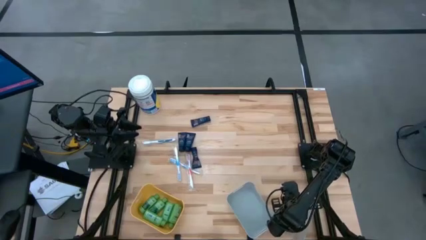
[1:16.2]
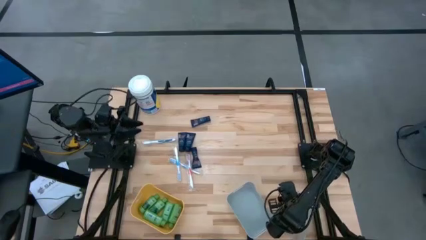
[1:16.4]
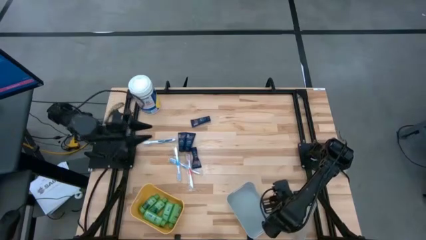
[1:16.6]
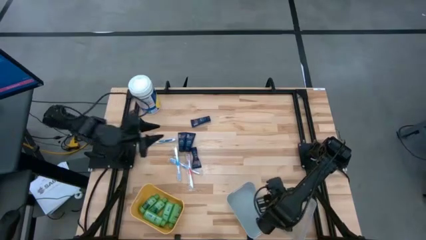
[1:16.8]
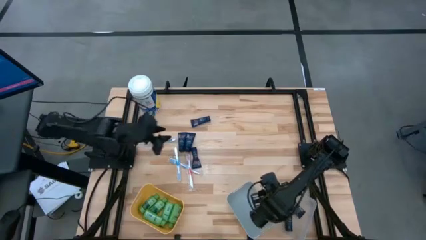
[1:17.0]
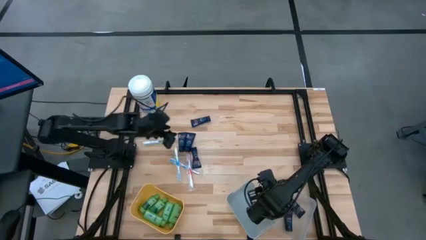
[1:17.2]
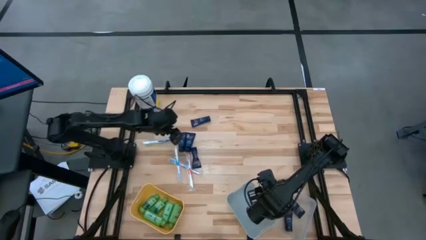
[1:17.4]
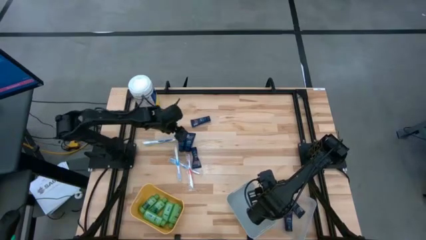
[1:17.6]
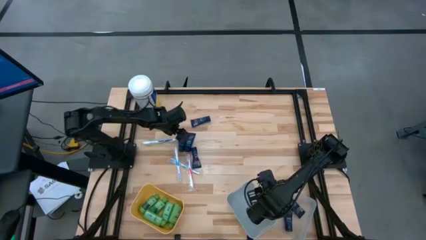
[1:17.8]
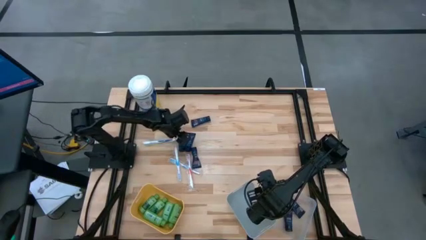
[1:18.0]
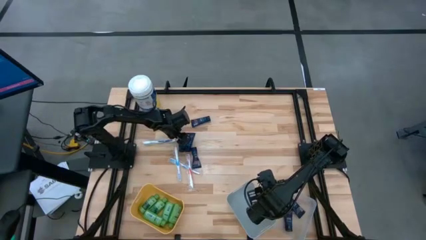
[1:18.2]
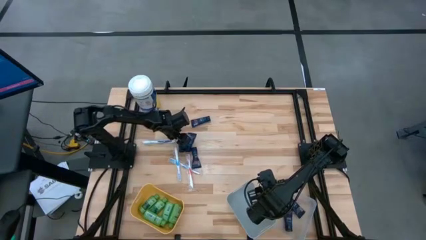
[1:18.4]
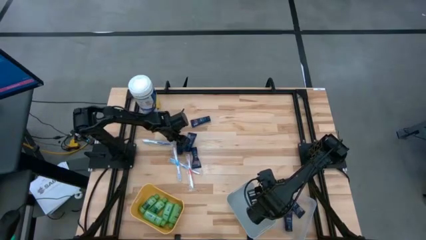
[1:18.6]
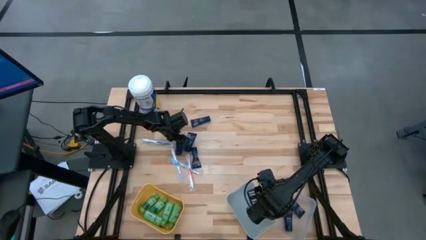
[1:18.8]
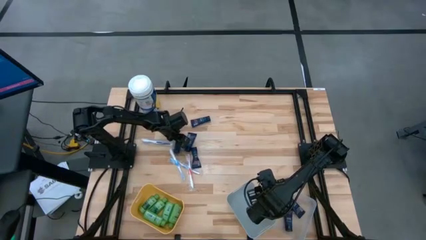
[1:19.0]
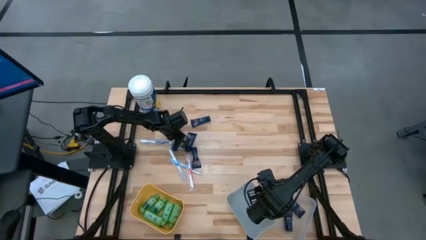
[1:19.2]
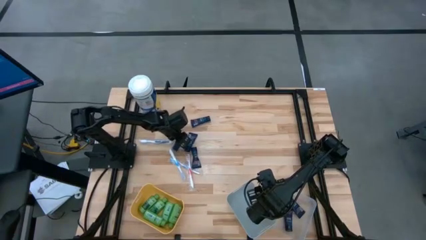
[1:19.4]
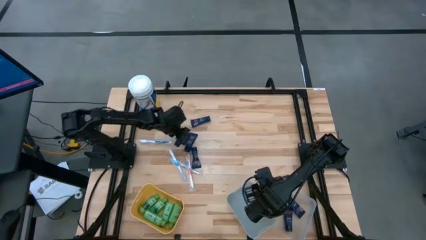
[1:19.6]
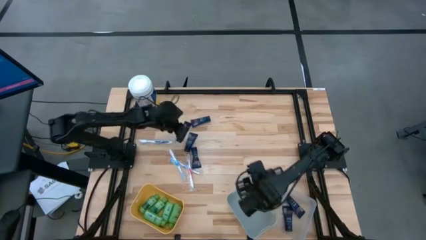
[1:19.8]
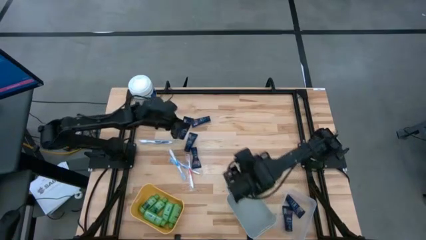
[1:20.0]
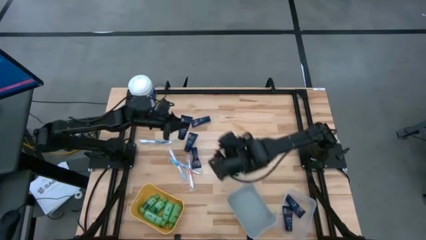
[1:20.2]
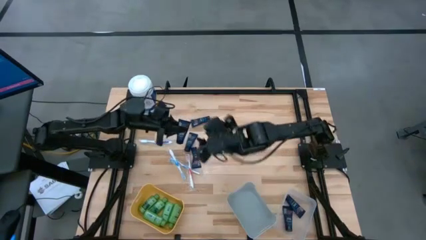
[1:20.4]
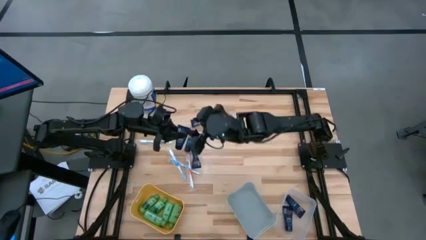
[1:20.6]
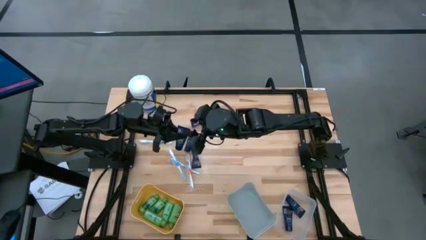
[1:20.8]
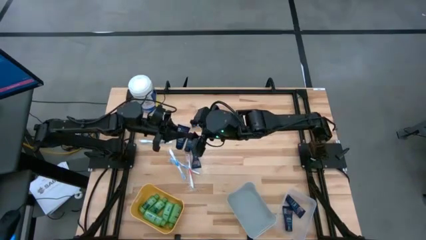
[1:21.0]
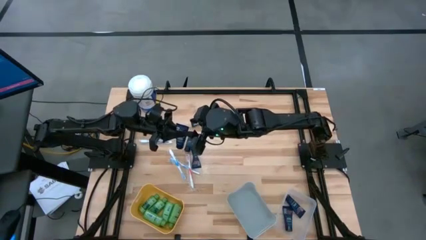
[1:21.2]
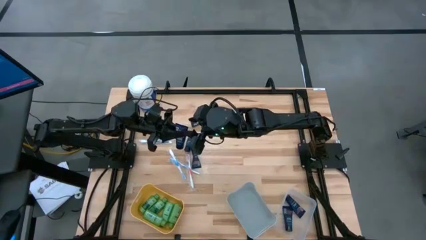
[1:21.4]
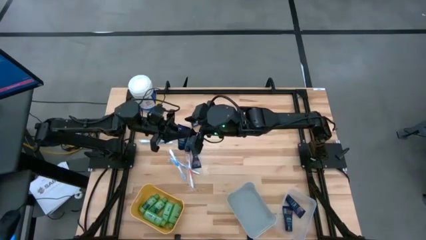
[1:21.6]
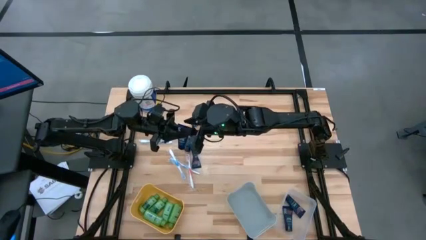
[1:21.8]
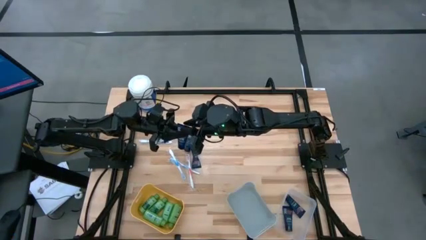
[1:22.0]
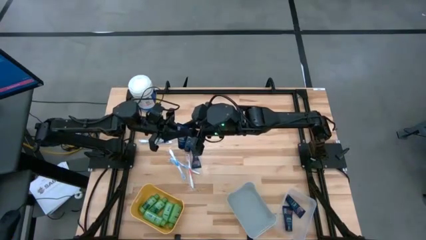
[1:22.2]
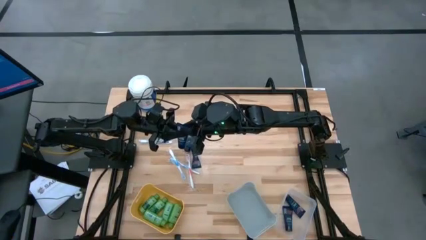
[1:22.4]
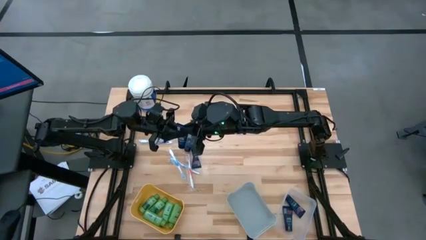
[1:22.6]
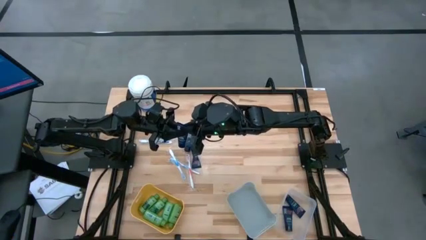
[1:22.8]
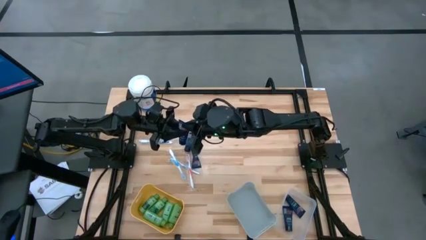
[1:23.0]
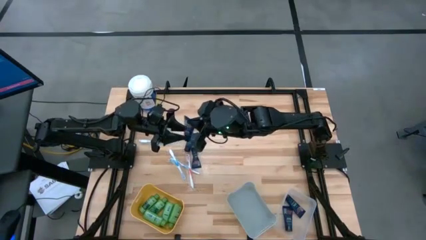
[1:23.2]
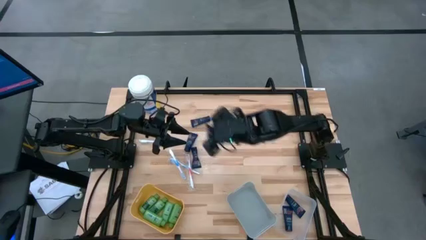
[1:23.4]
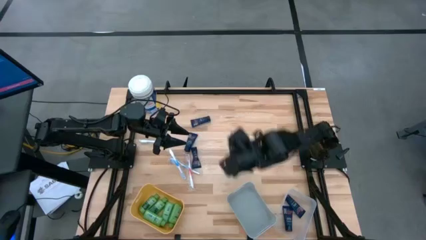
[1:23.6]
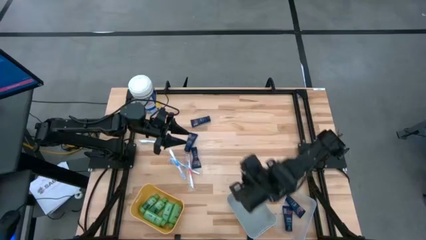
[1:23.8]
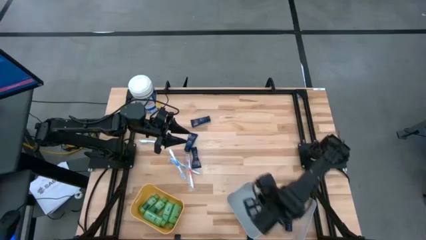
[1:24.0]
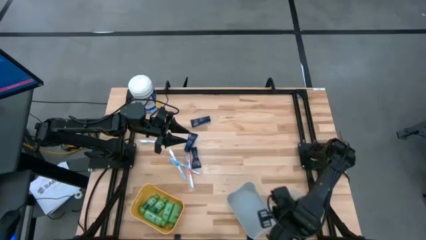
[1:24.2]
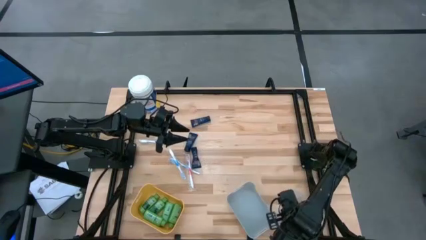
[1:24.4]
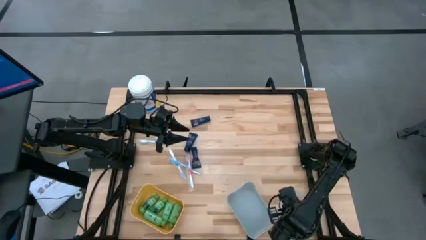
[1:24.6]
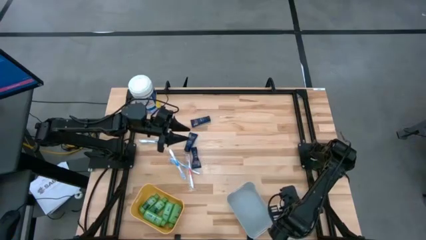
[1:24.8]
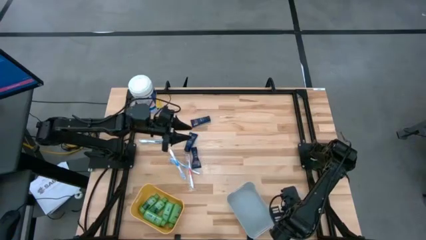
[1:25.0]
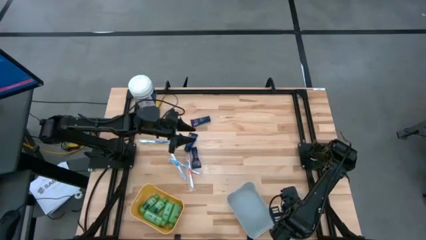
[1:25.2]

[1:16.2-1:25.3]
Task: Pick & Place Travel size toiletries
Put the blue shave cream into the transparent bin

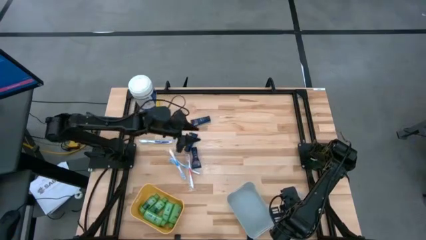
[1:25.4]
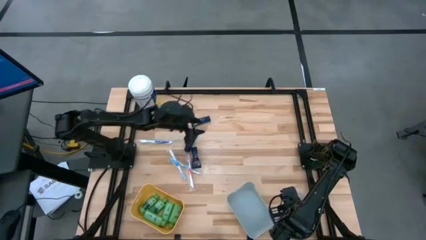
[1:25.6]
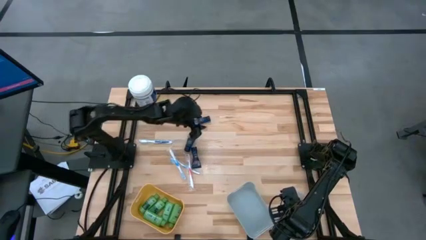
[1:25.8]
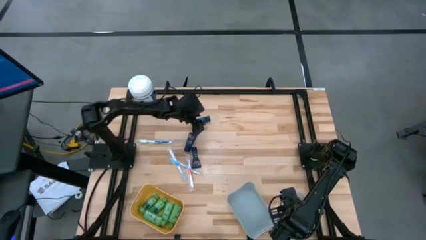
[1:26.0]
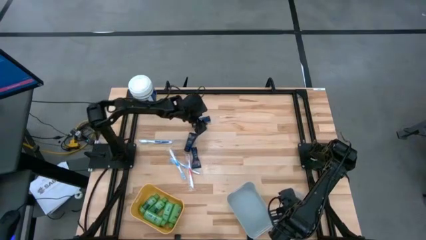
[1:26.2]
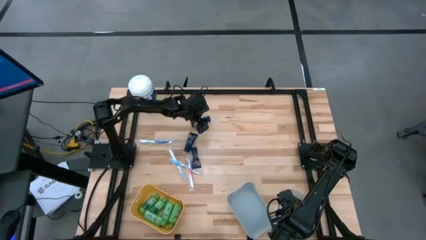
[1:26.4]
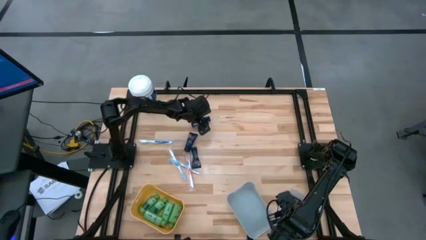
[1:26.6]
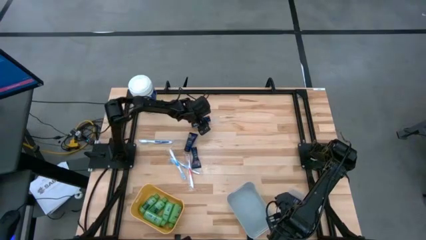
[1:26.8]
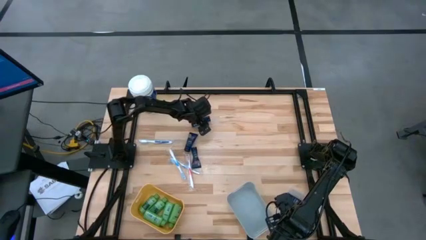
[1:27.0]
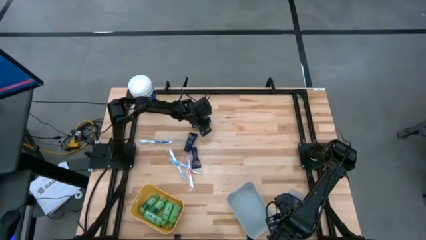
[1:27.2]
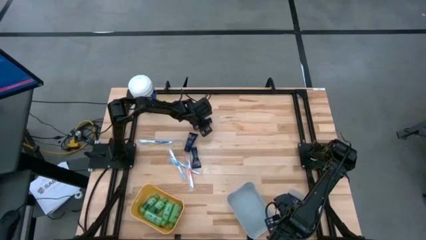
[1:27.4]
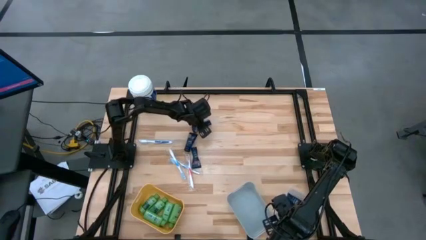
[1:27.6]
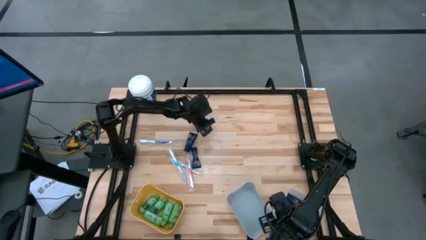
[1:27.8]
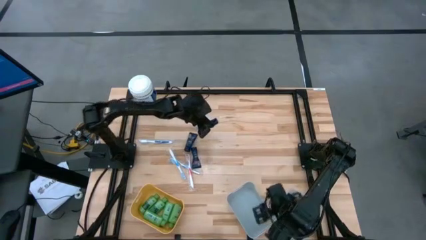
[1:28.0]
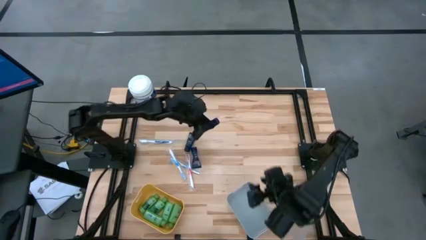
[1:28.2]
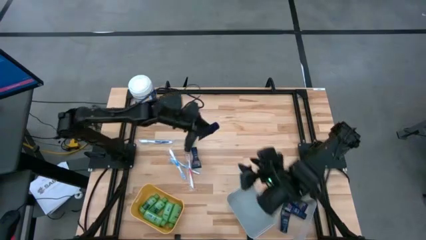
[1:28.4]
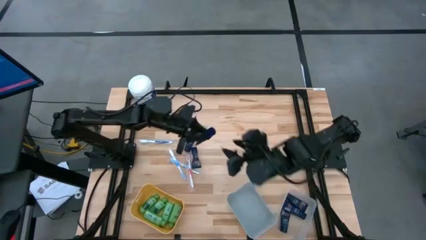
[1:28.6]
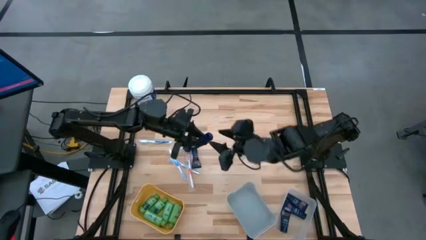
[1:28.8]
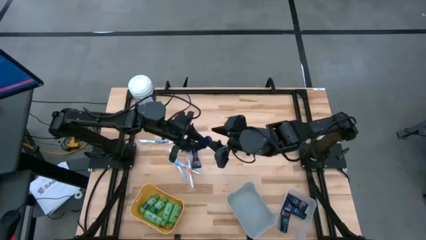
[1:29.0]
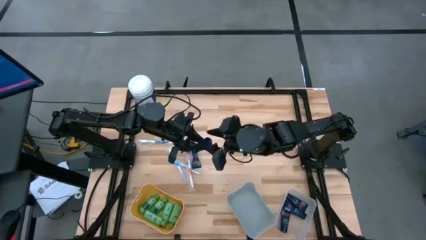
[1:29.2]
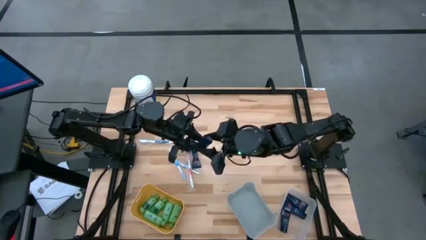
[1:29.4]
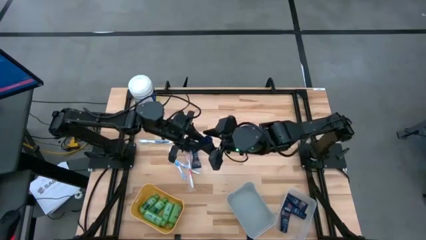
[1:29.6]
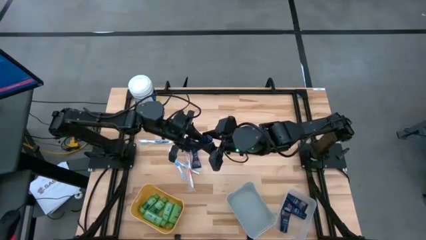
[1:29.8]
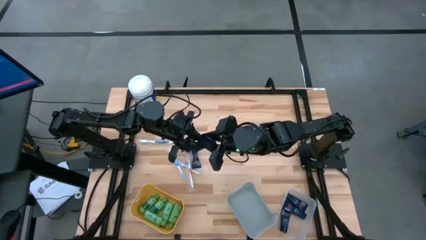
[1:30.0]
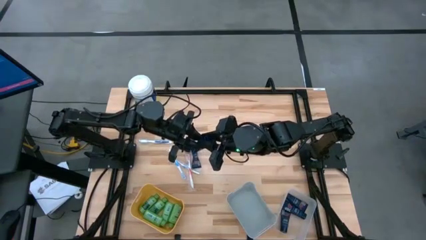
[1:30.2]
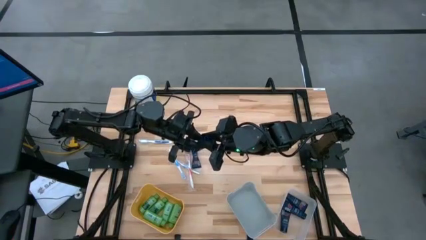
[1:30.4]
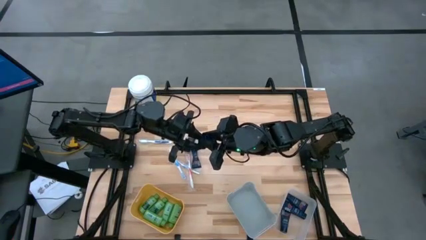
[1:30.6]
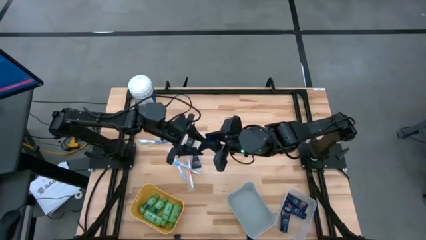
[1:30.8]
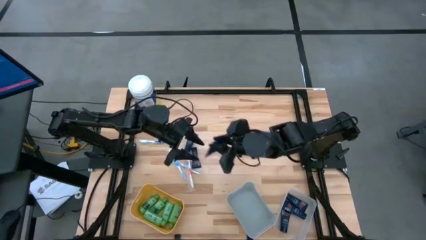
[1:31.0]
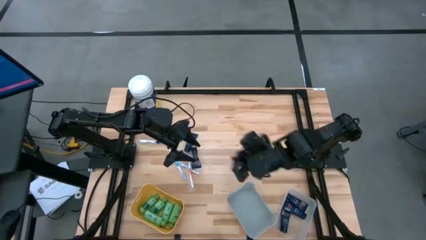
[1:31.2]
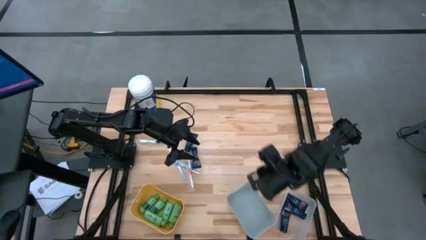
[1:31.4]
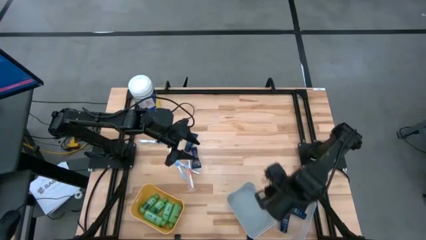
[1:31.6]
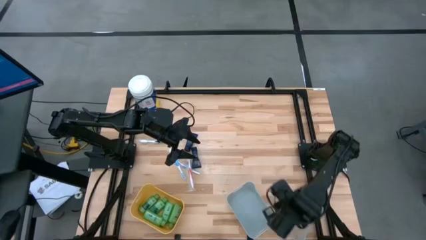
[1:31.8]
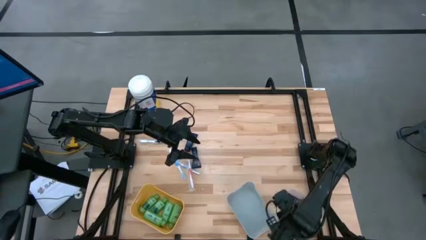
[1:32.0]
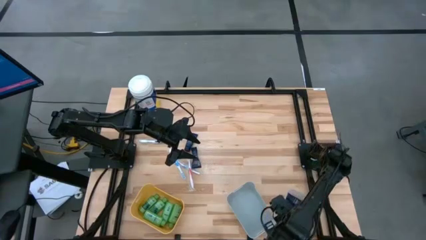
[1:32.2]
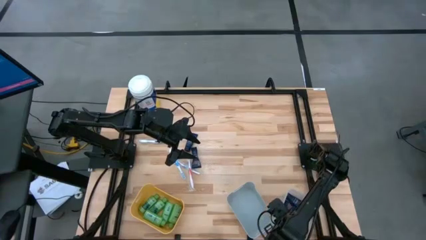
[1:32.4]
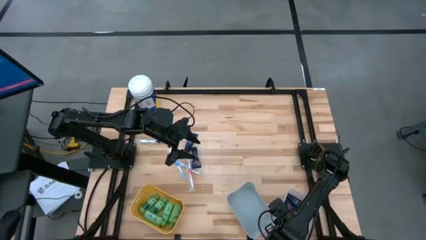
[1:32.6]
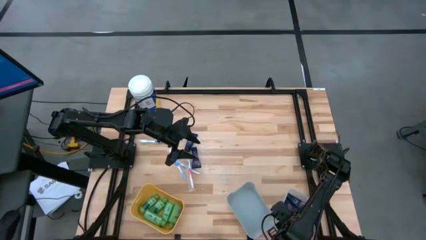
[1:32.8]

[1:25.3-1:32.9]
Put the blue shave cream into the transparent bin

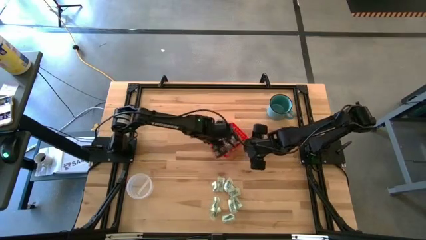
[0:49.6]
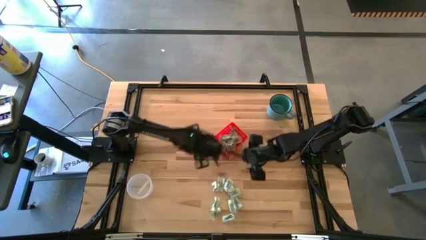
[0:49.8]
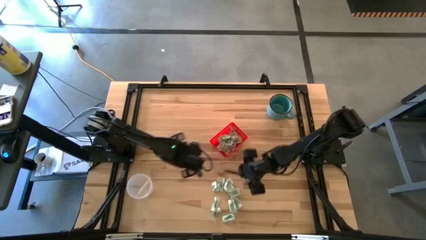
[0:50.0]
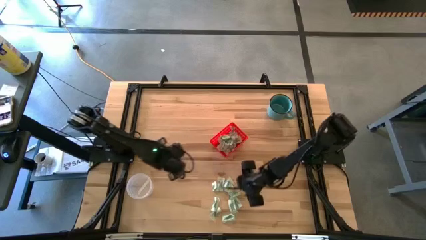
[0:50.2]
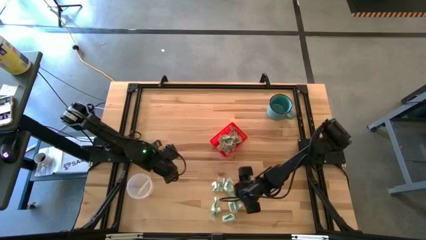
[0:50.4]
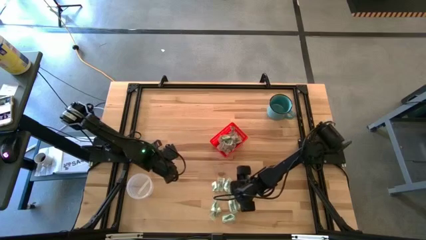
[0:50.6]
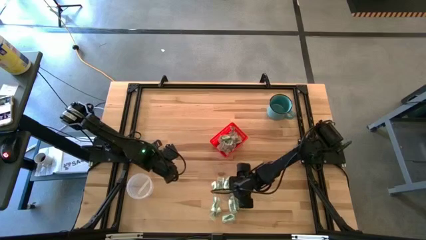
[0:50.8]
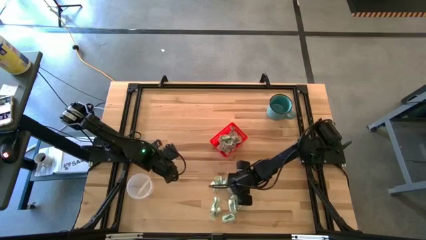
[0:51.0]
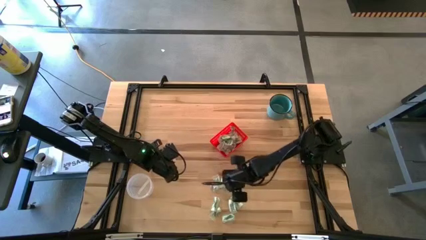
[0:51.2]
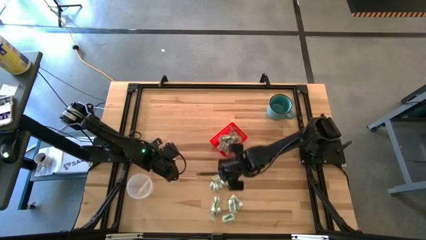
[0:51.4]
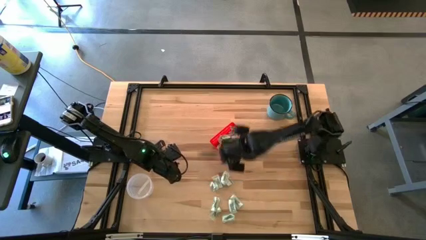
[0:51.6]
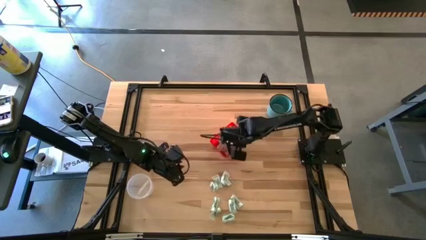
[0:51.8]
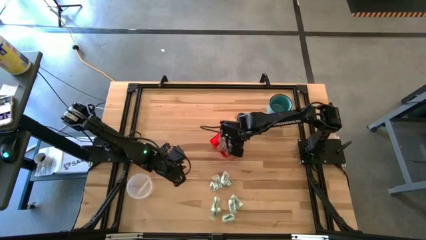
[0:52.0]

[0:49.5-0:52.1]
Task: Pick and place items into bin
Put the stevia packet into the red bin
